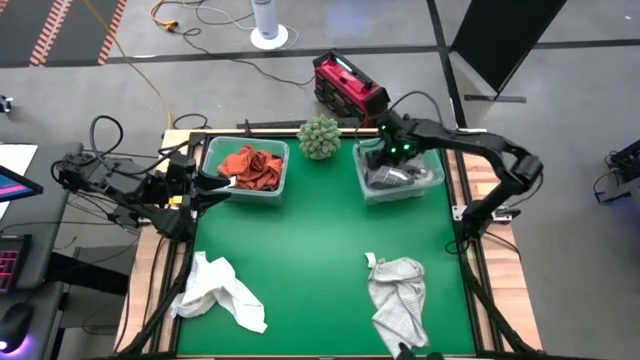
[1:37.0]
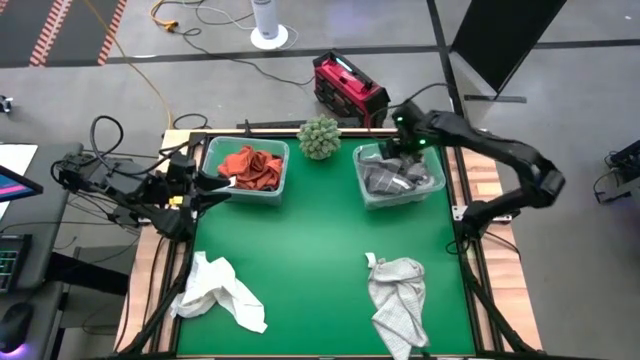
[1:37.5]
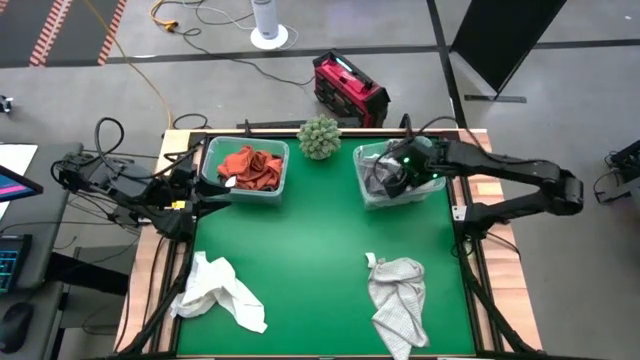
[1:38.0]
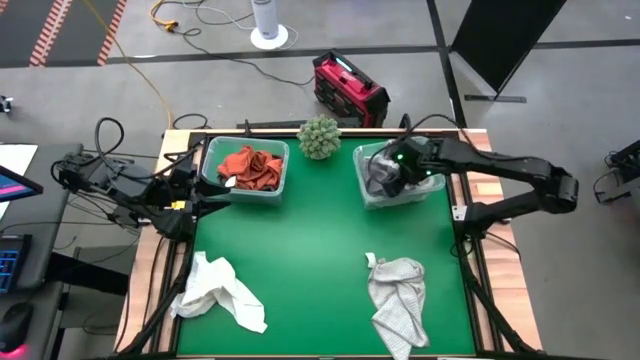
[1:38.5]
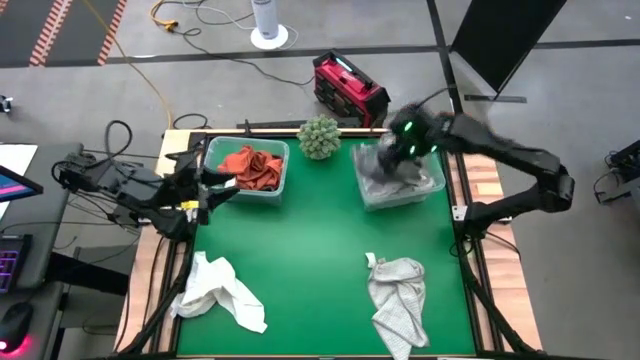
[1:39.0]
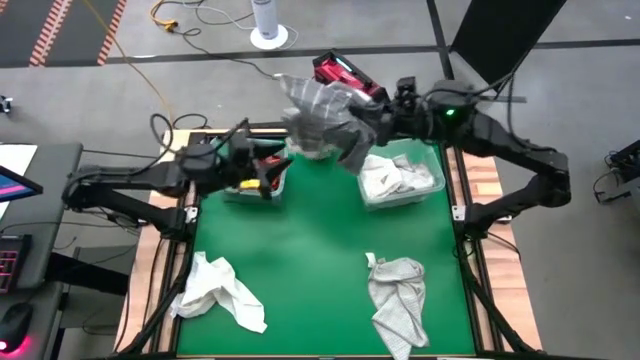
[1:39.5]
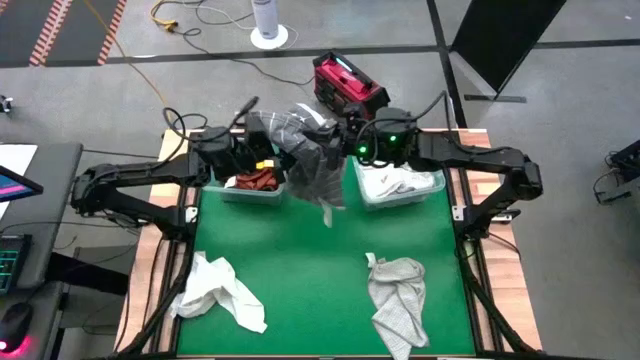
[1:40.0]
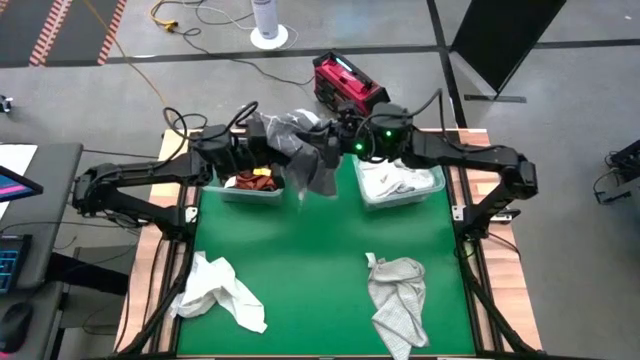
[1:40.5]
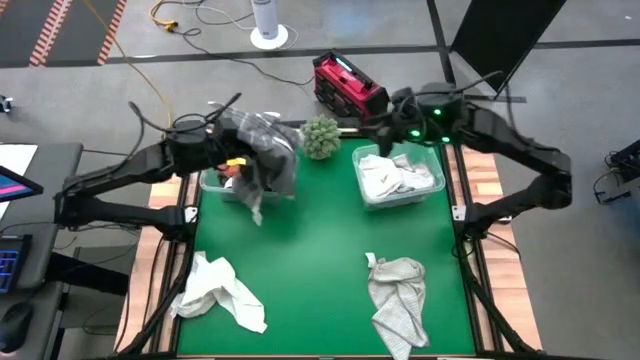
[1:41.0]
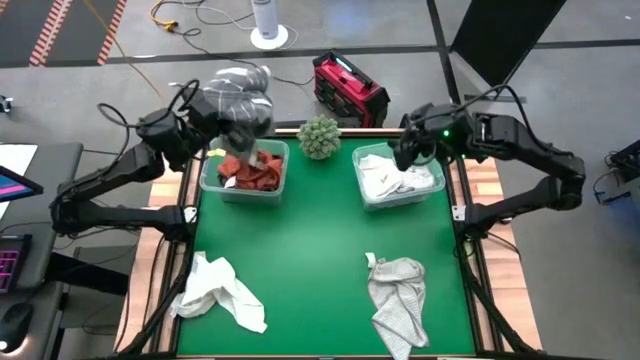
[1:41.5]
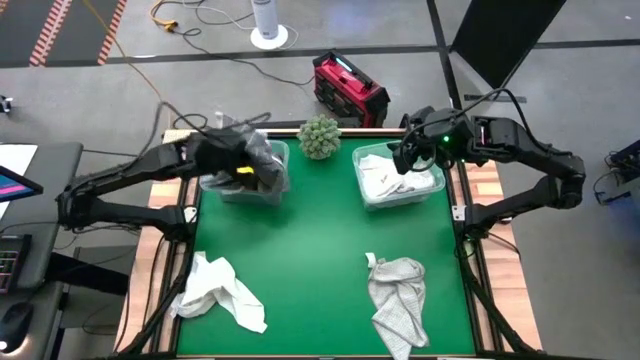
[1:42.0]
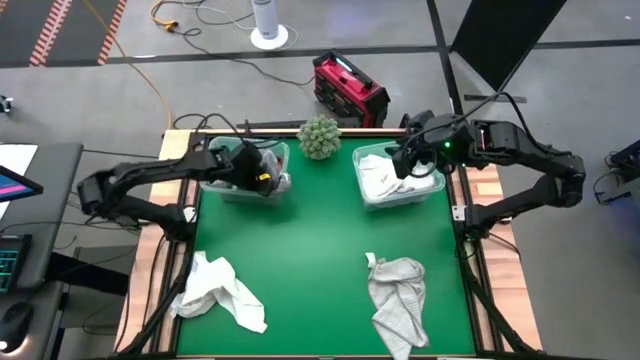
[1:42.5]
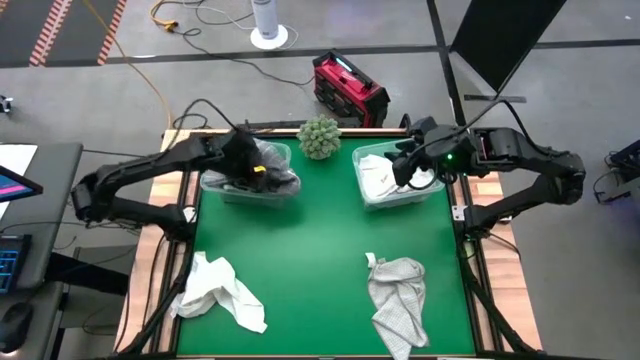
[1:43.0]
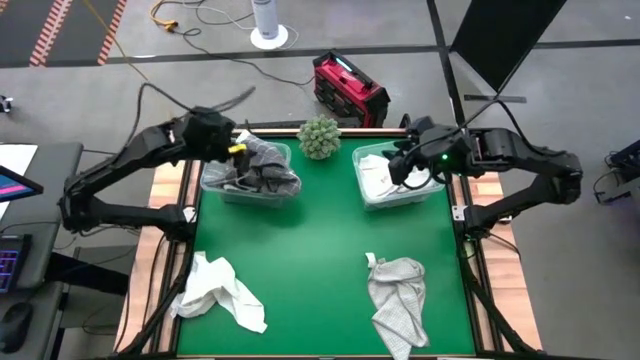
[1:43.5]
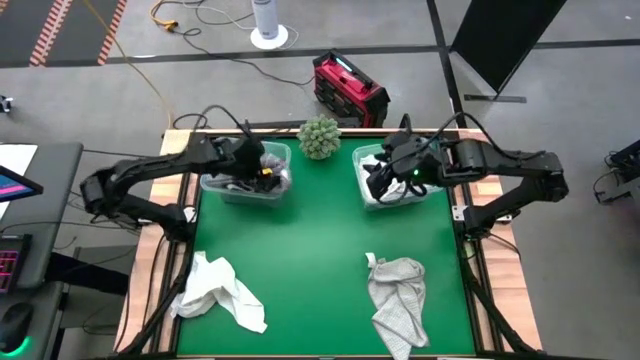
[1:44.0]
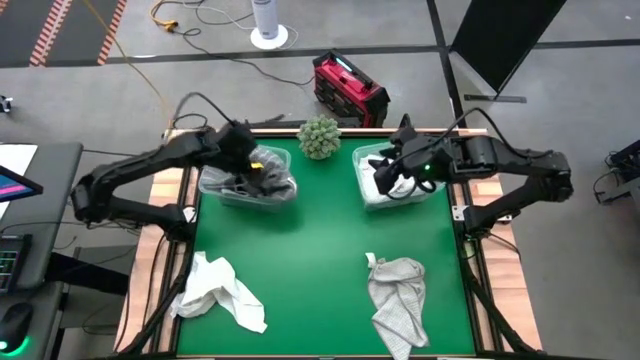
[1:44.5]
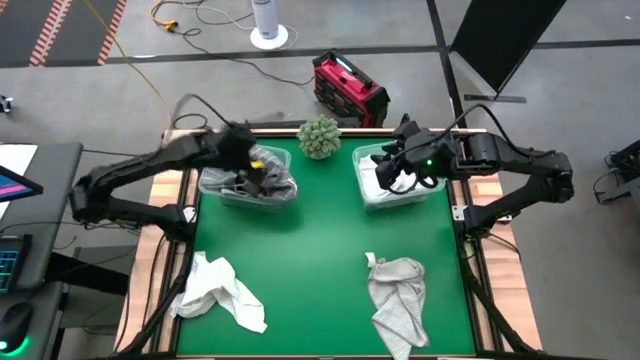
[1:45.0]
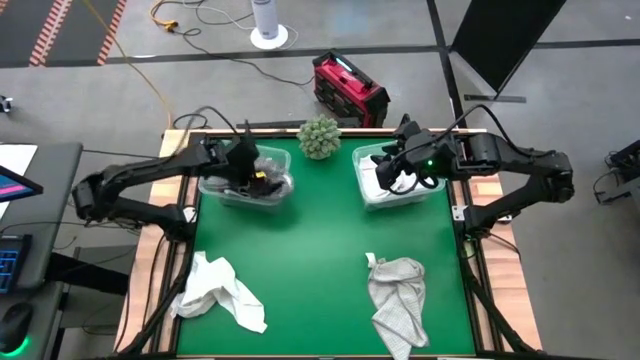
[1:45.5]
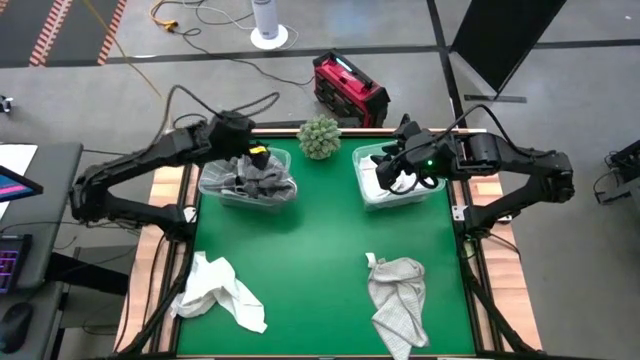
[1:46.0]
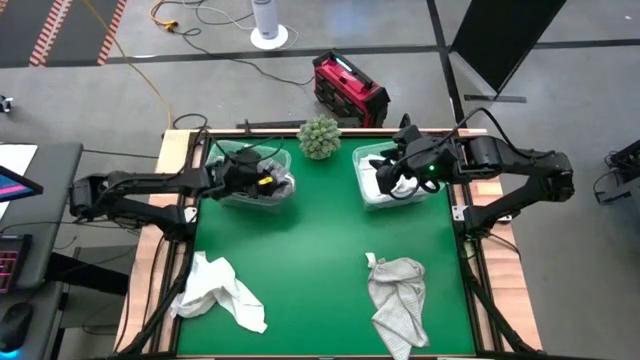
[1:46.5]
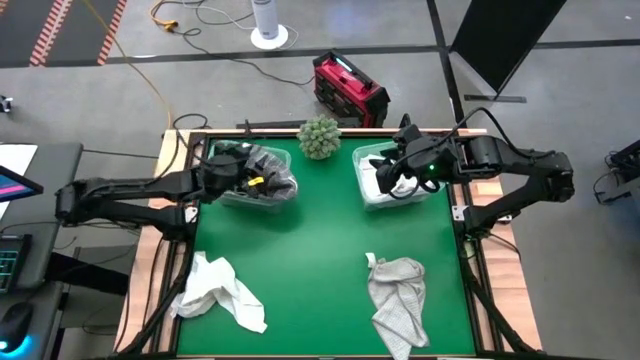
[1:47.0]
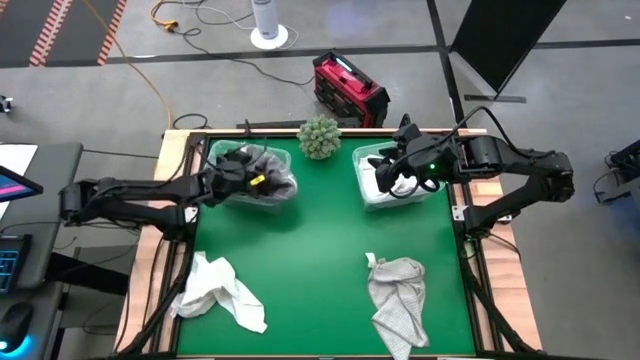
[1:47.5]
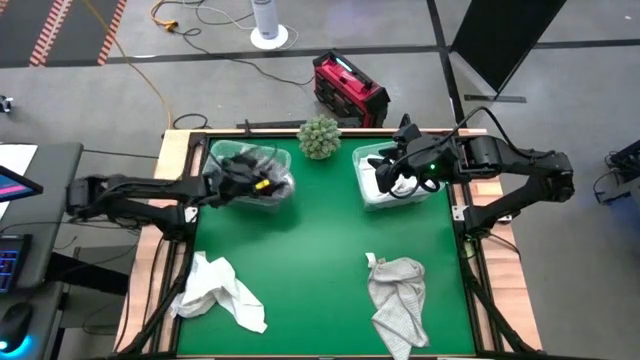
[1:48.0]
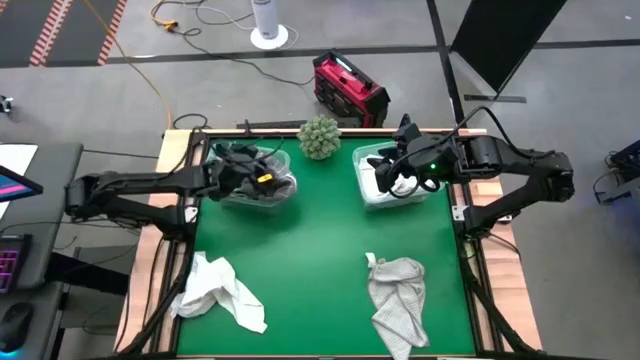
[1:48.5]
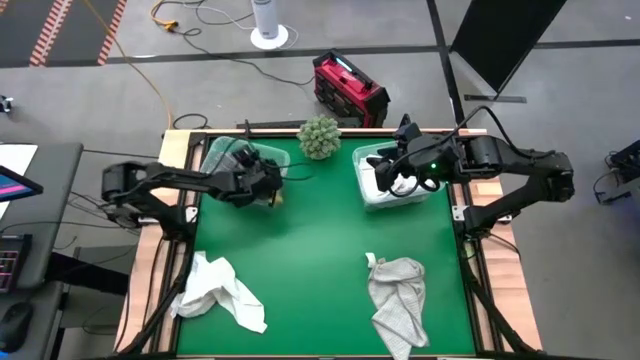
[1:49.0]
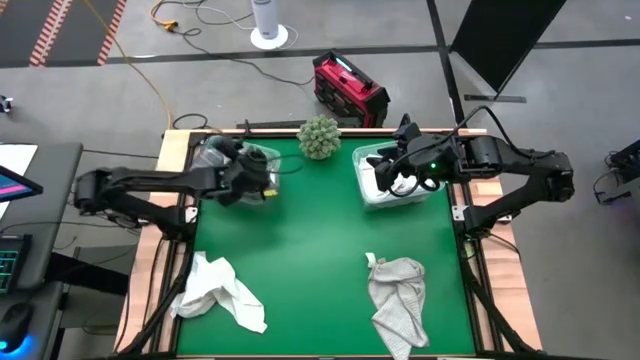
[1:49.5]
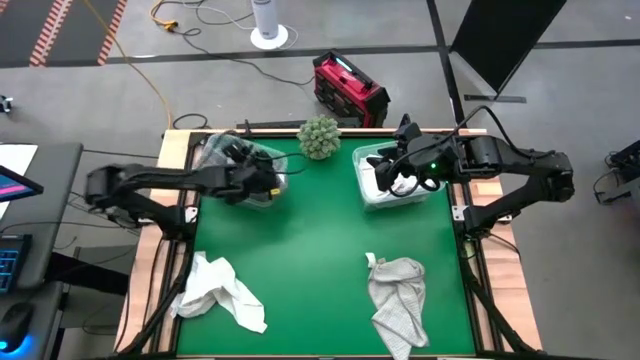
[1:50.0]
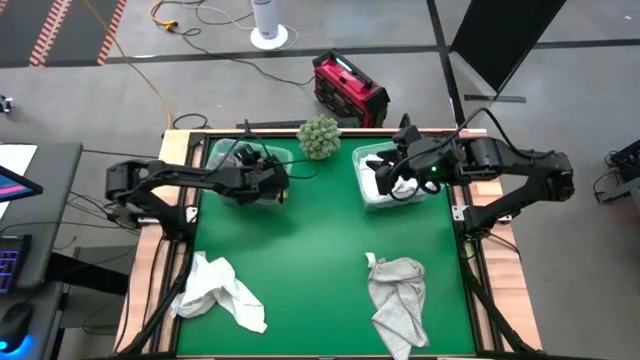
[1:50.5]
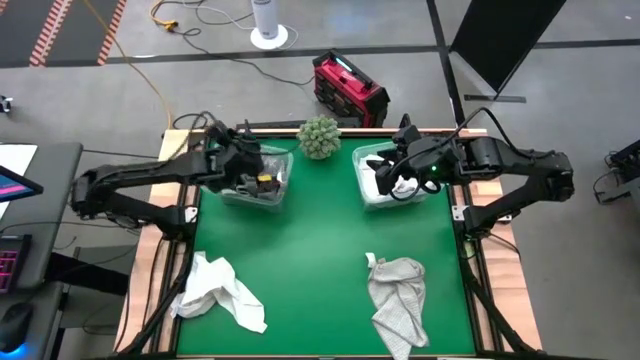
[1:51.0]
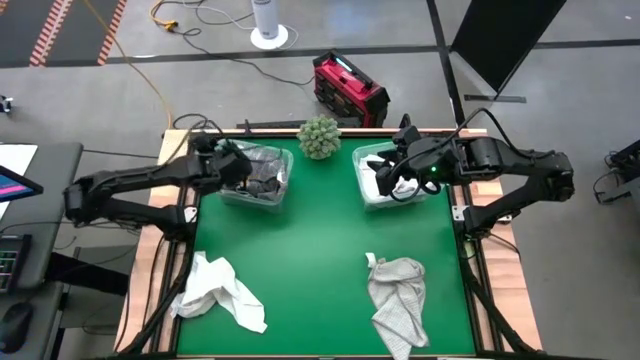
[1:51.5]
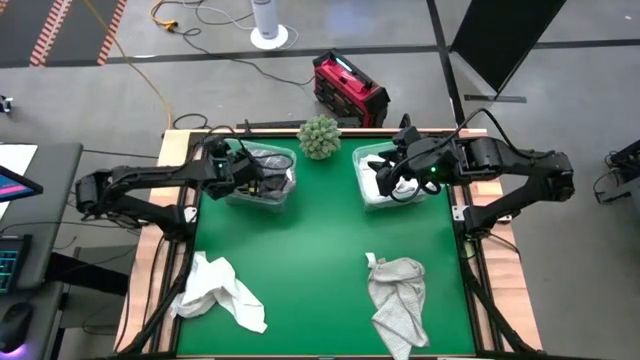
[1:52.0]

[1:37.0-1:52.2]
Task: Sort towels by color in basket
Put the black pattern towel into the right transparent bin

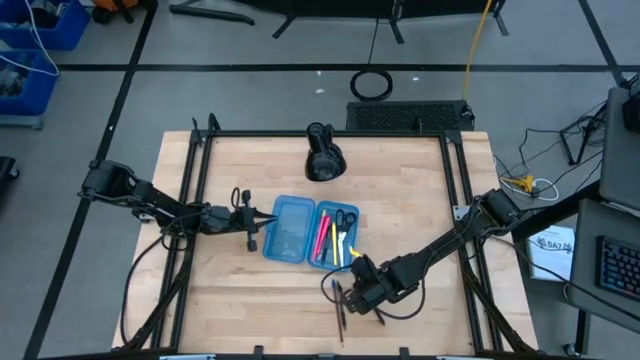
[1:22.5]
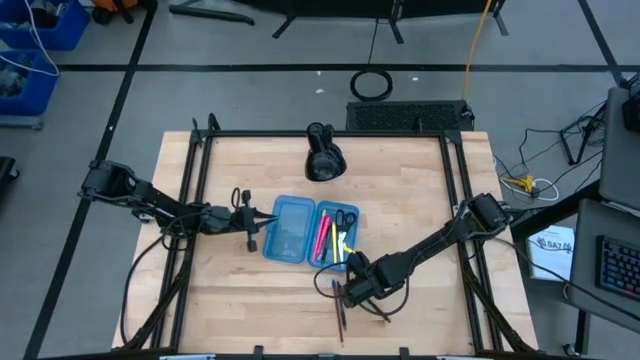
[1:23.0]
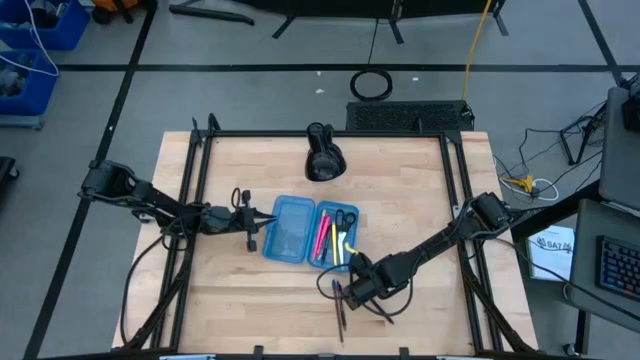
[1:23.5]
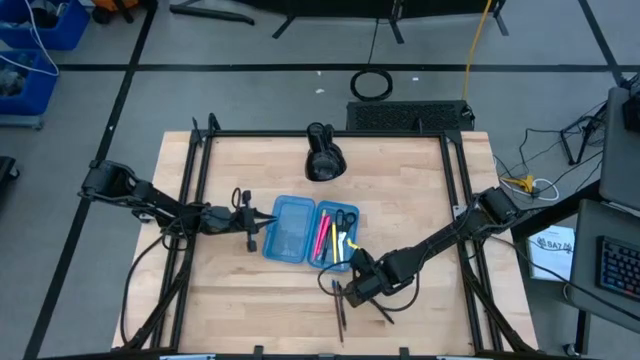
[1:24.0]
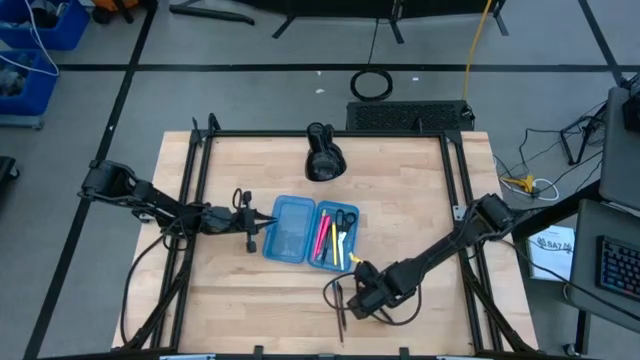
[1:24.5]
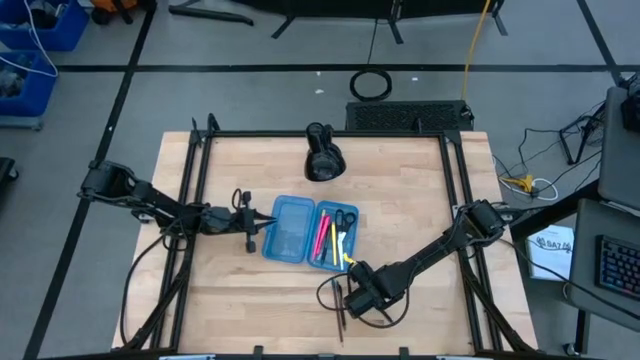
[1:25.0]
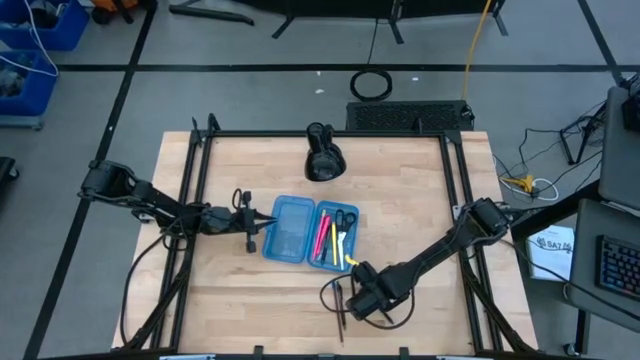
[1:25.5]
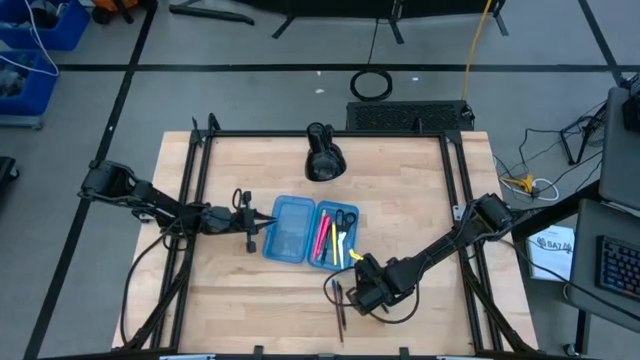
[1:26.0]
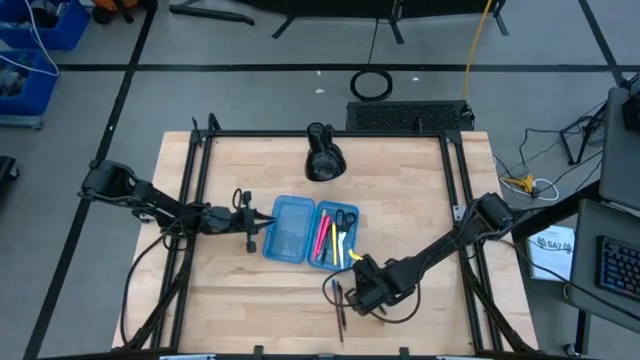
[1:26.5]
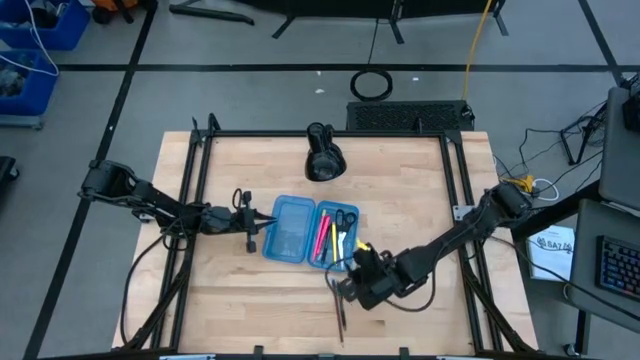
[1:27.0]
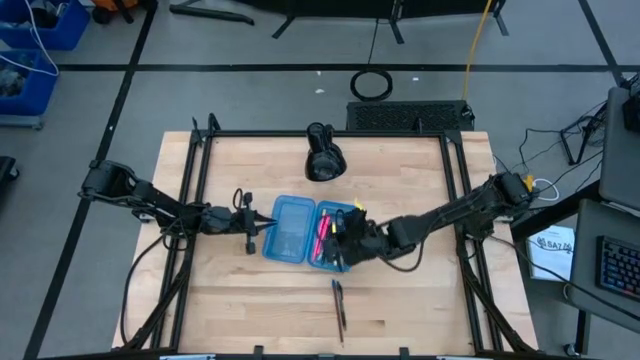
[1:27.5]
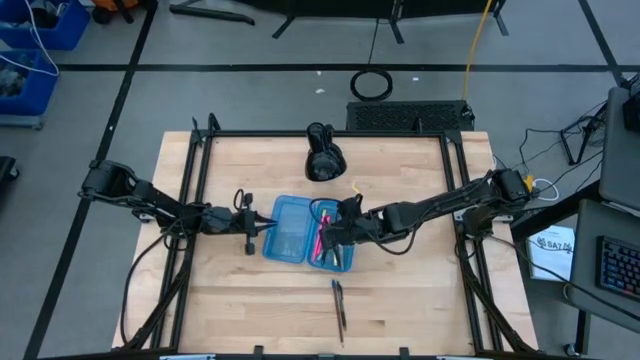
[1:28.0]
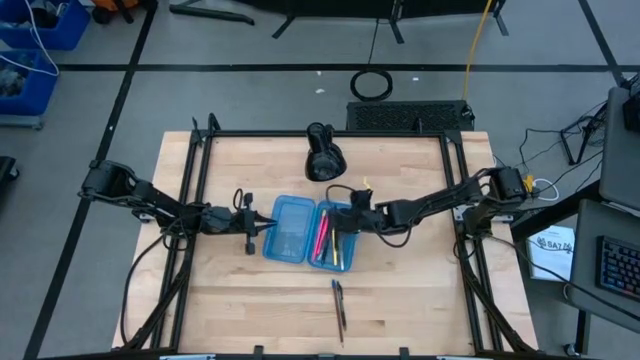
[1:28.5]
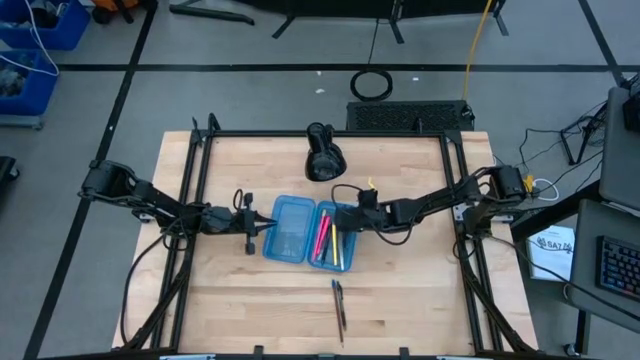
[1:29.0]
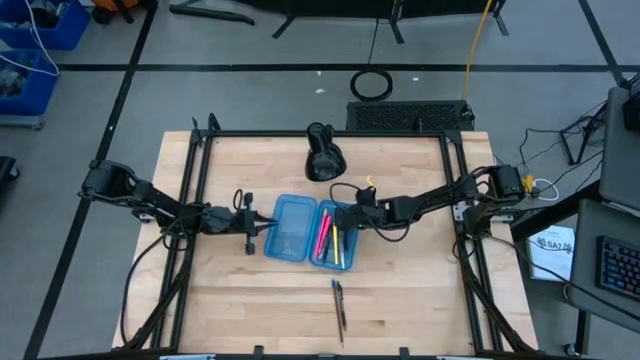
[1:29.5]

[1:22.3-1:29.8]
Task: Pick & place school supplies into a supply box
Put the right black pen into the blue supply box
